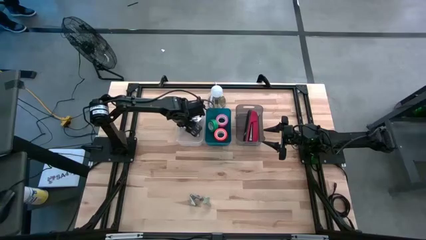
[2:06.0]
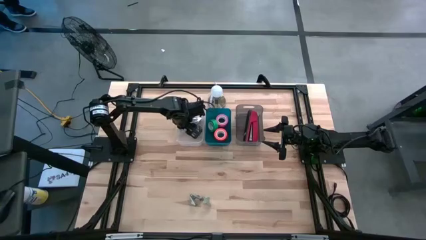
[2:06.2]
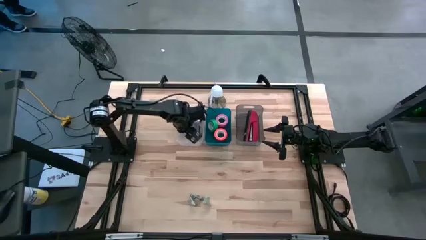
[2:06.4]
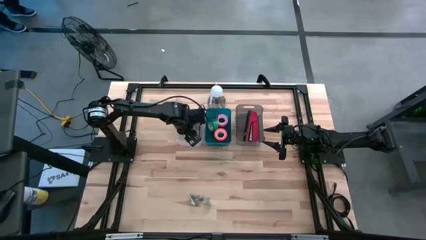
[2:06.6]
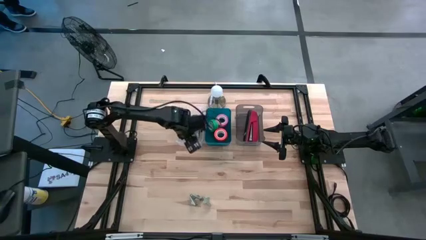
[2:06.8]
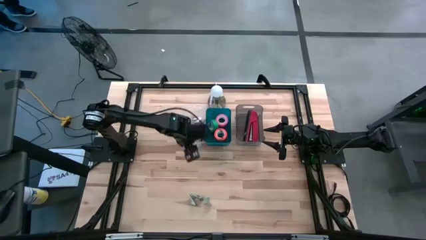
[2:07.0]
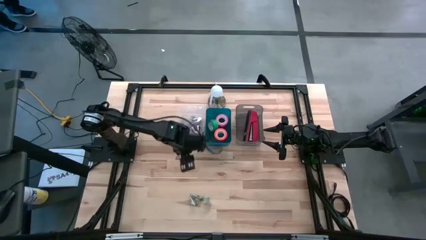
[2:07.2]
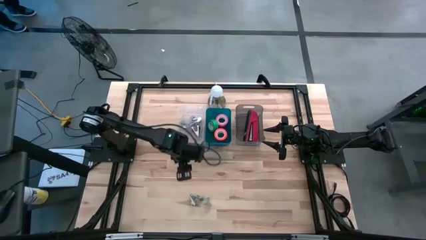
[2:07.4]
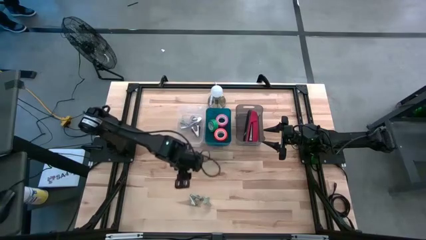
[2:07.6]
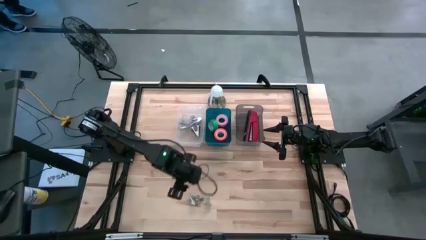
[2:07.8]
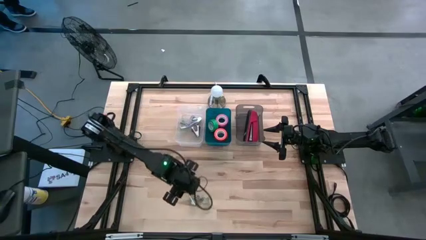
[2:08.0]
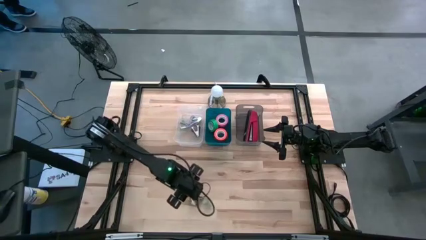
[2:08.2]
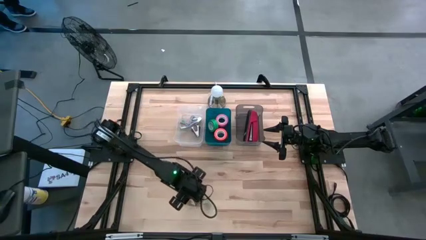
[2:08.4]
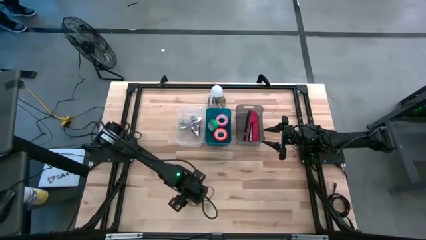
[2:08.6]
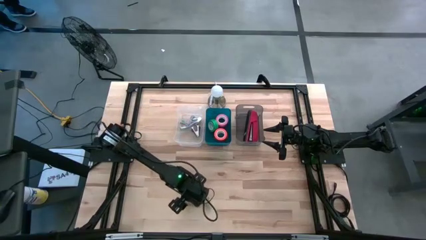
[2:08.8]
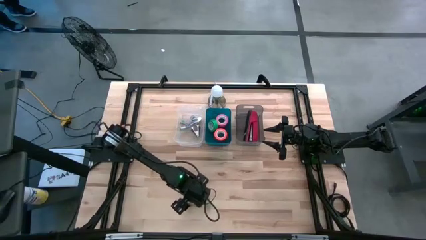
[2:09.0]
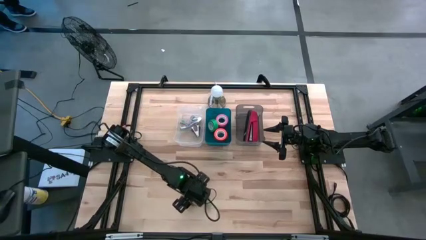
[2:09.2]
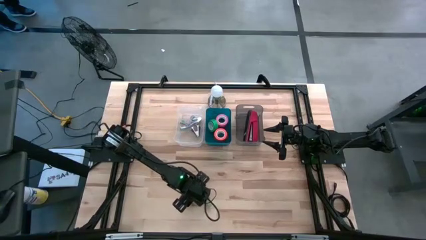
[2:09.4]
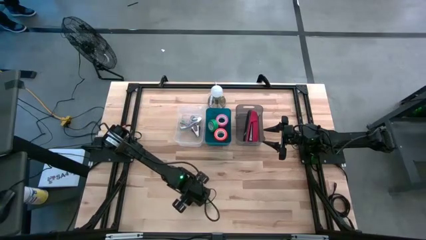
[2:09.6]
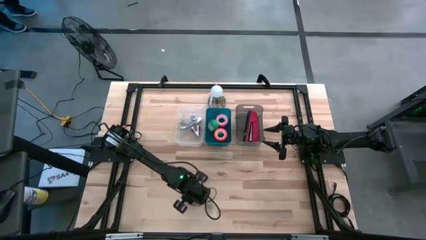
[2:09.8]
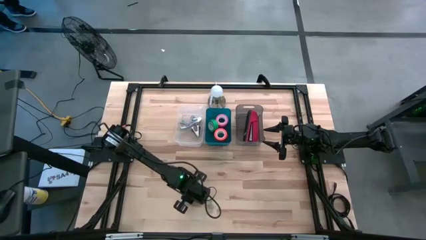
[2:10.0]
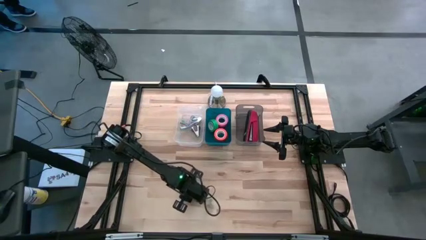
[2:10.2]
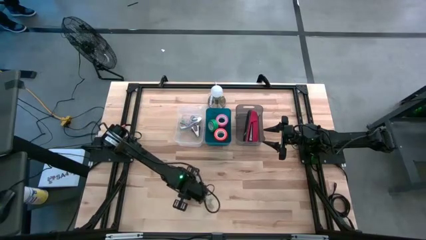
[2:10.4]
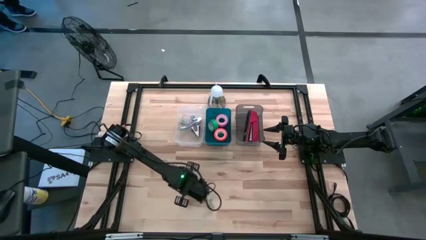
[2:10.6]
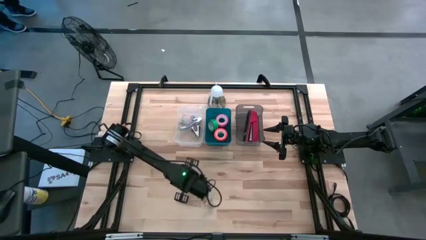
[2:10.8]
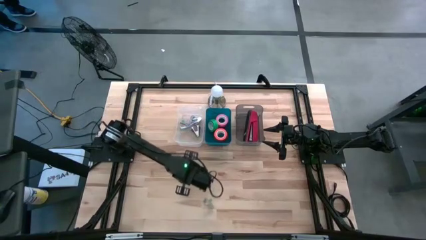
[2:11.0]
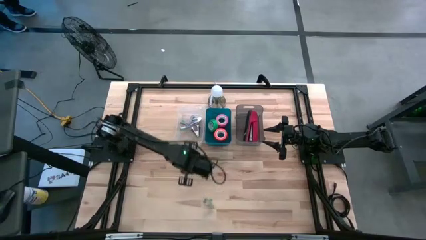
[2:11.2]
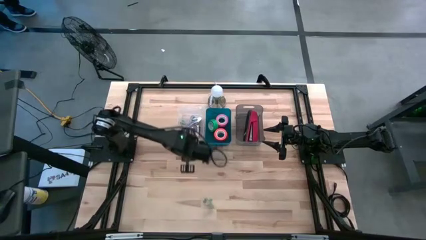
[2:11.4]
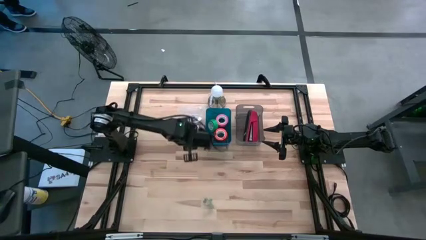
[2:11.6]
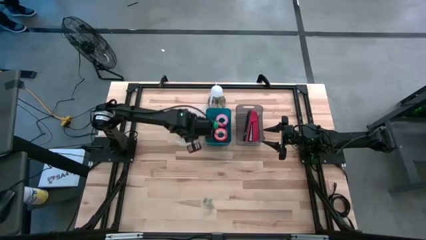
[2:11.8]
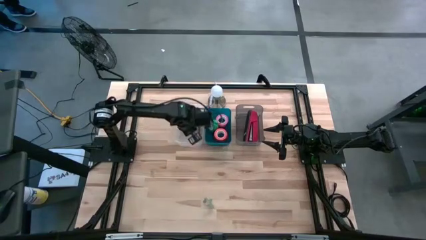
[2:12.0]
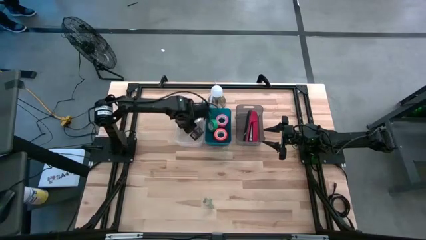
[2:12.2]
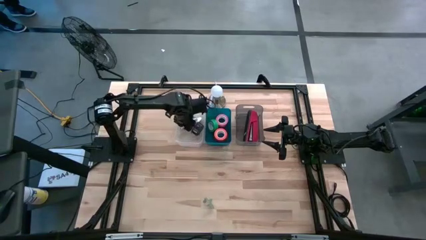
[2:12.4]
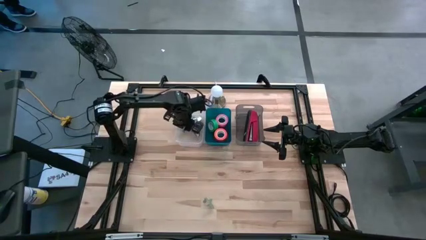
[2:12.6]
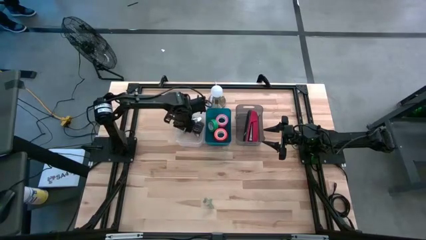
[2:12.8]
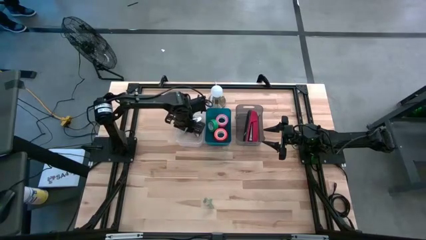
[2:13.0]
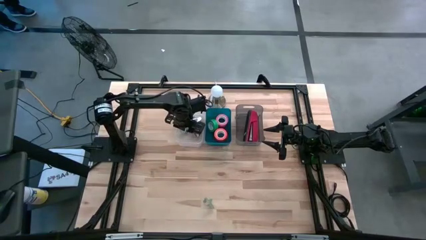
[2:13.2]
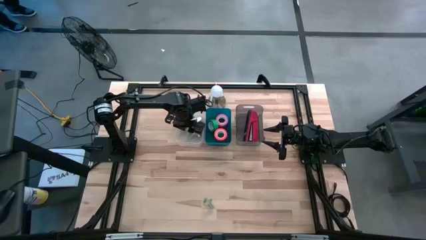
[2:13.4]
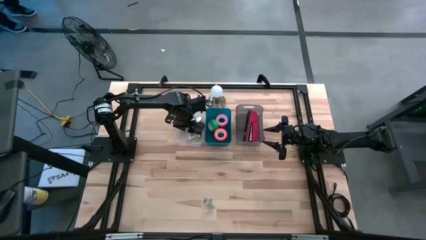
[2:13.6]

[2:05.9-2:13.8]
Task: Pick and place Stapler, Stapler remover, tape
Put the left gray staple remover into the transparent bin

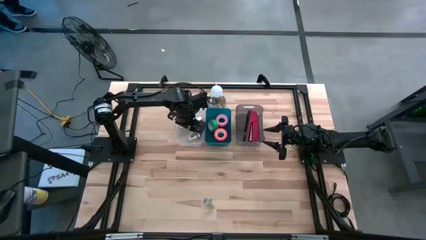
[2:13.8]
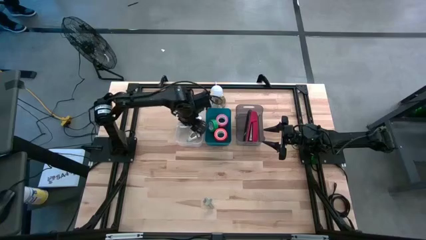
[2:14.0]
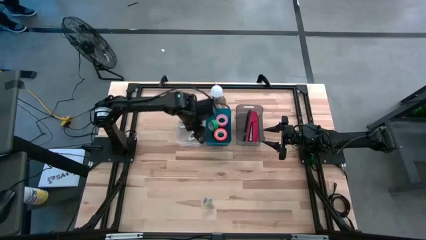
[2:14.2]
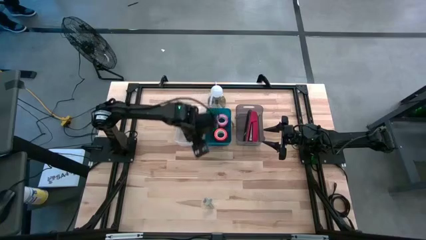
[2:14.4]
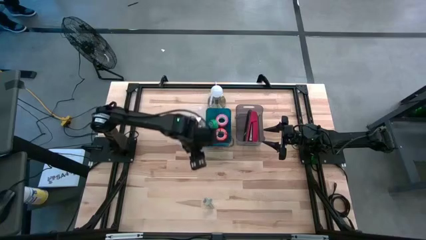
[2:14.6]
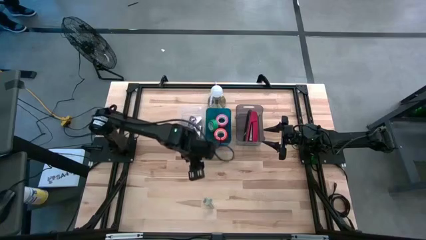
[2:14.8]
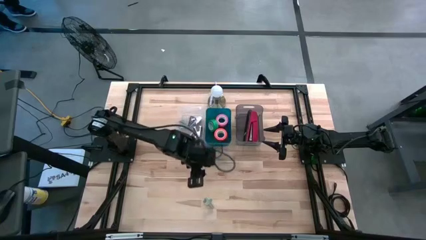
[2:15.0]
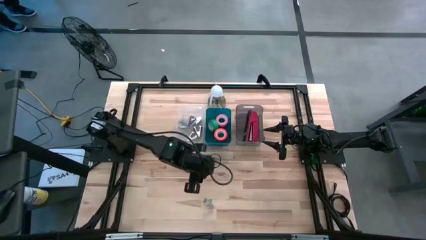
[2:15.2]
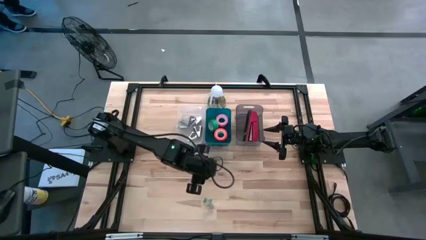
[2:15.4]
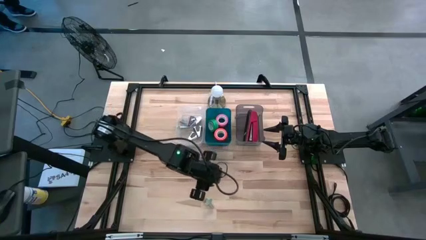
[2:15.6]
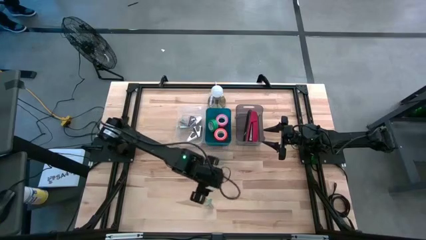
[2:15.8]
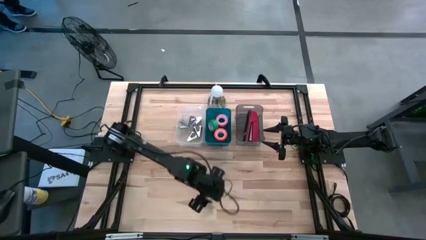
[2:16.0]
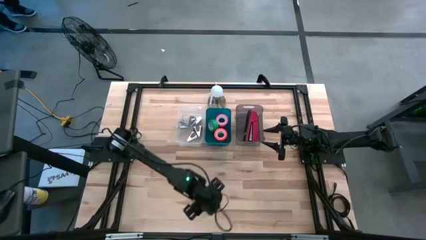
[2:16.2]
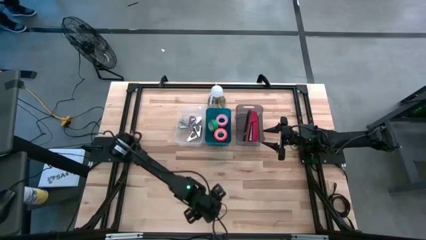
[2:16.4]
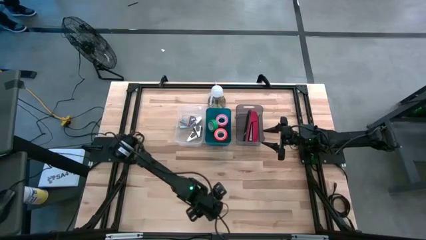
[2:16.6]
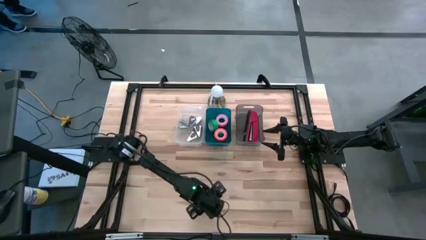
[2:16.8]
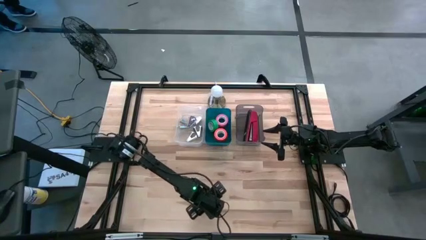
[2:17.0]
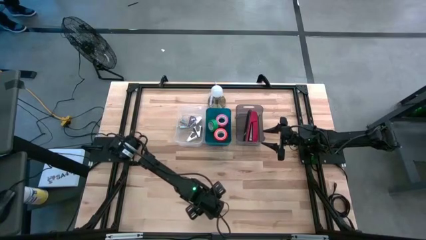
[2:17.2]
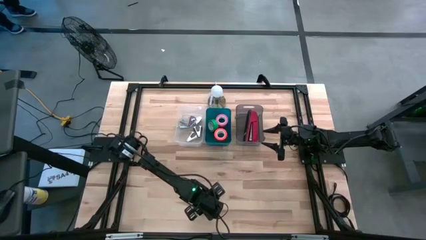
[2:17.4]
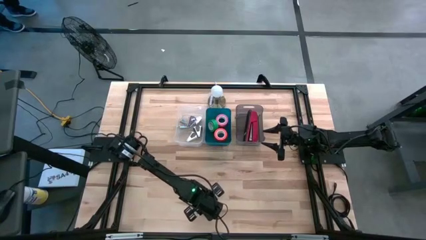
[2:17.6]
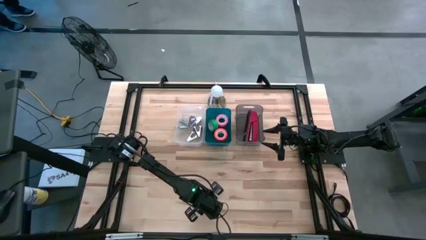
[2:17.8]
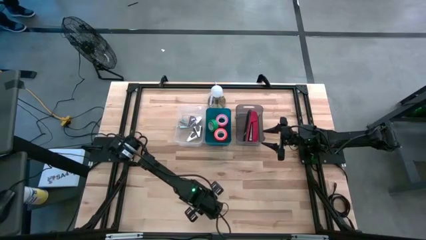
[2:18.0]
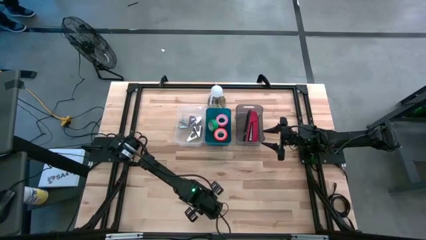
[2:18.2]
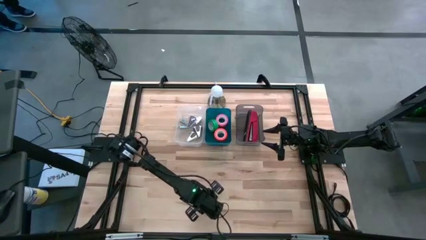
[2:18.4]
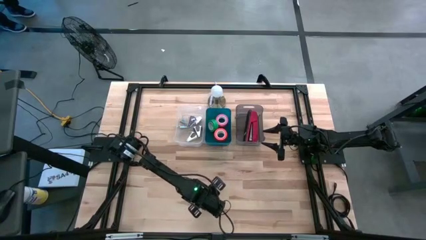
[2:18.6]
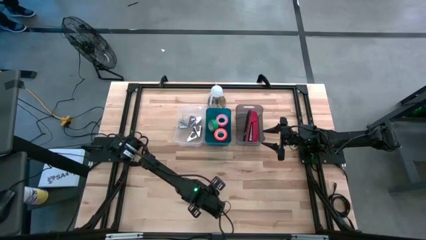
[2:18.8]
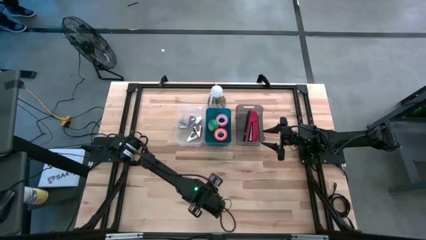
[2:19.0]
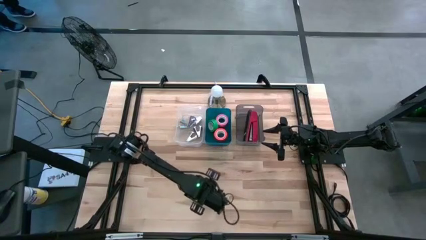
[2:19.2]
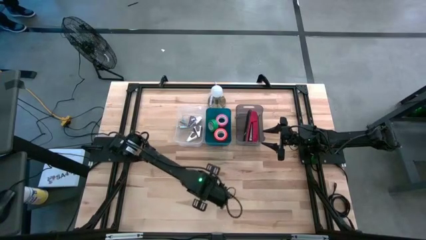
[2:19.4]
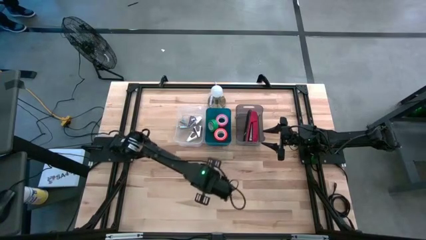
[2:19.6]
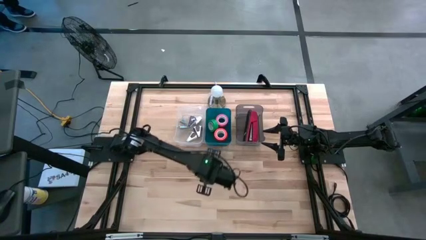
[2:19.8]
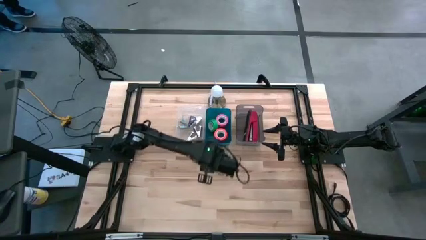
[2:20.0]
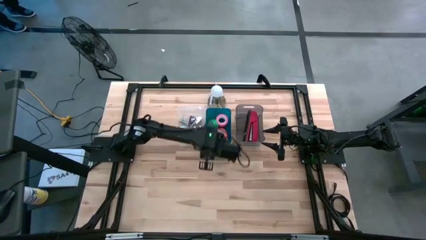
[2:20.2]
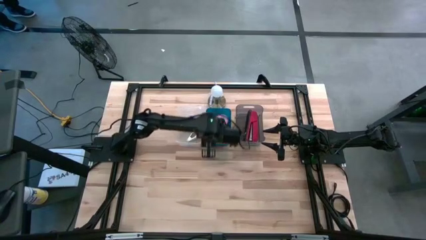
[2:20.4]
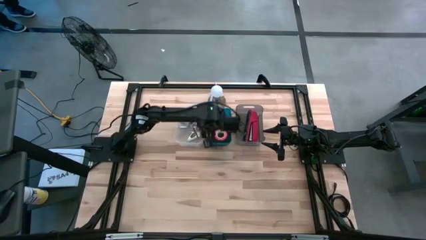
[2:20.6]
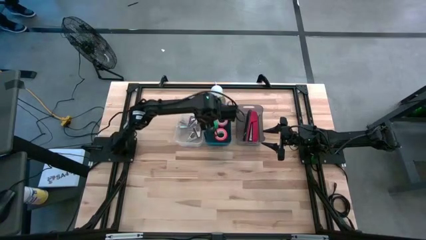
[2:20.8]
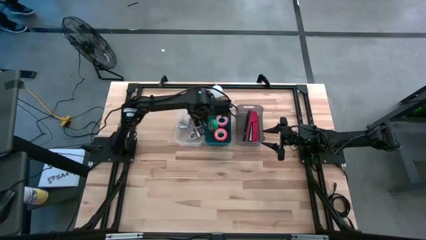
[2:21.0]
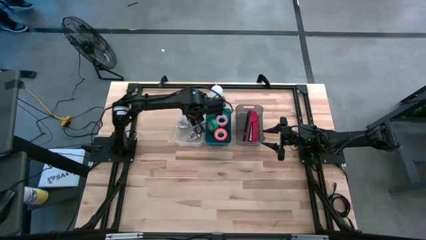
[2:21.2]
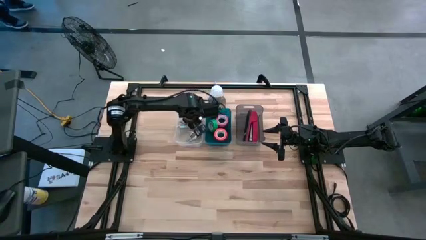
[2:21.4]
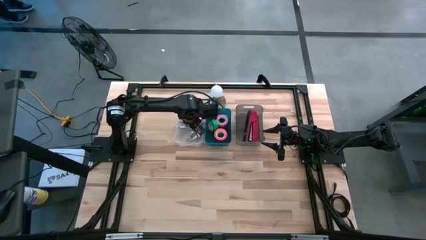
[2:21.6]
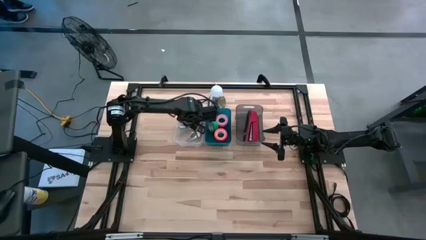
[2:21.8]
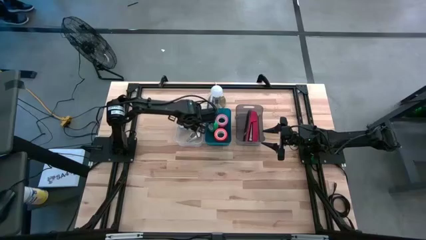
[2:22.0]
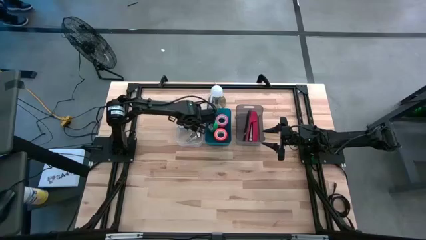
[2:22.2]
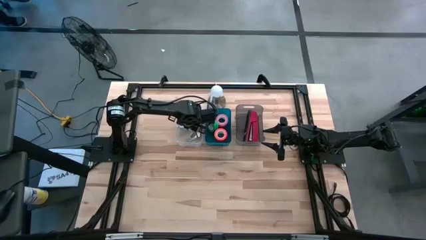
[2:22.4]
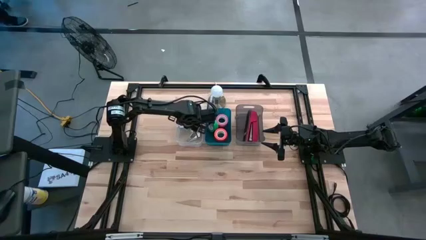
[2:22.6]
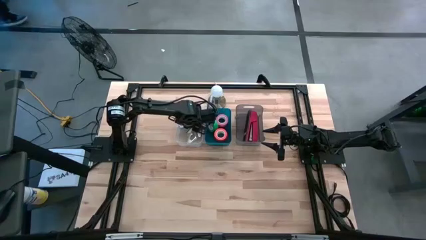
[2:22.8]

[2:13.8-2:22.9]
Put the gray staple remover into the transparent bin
